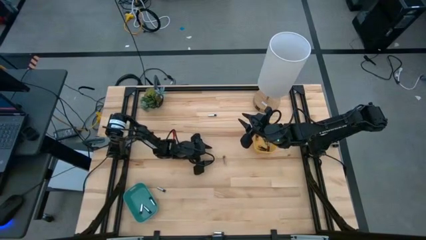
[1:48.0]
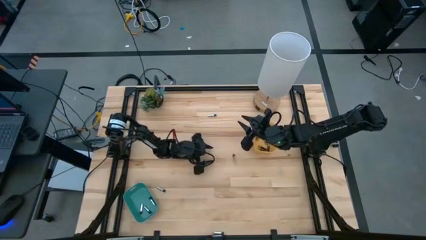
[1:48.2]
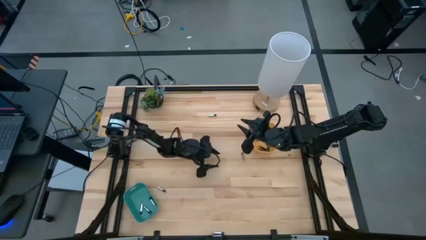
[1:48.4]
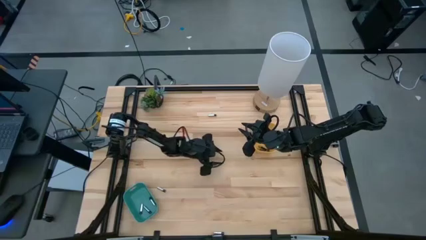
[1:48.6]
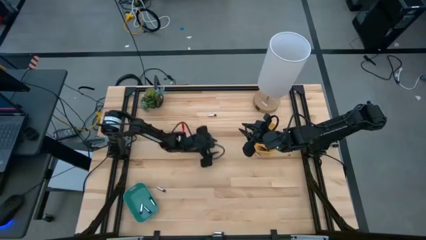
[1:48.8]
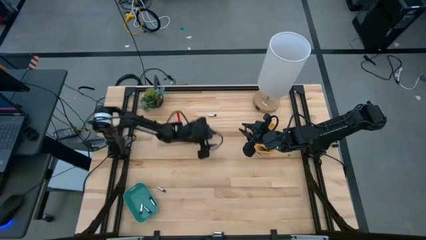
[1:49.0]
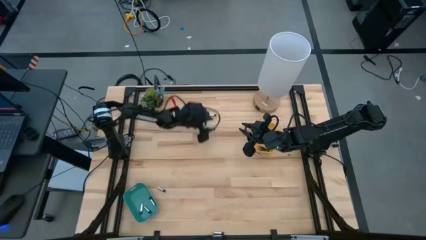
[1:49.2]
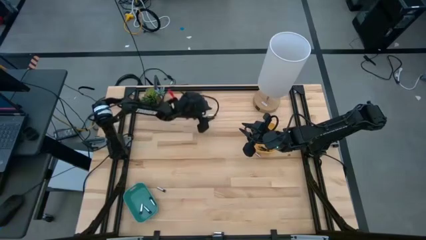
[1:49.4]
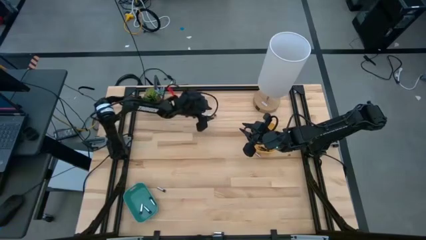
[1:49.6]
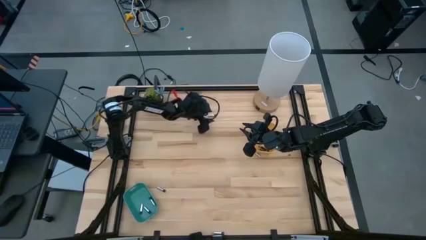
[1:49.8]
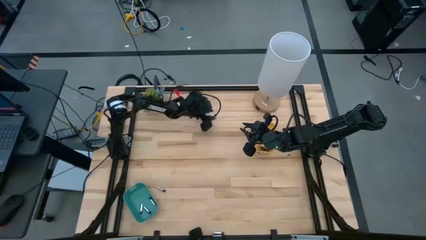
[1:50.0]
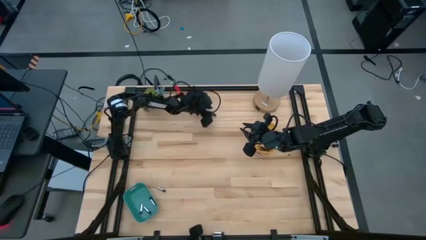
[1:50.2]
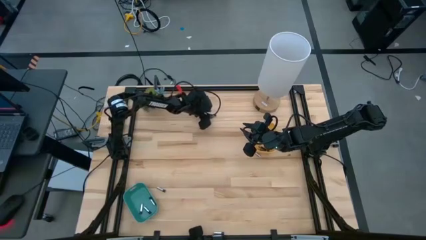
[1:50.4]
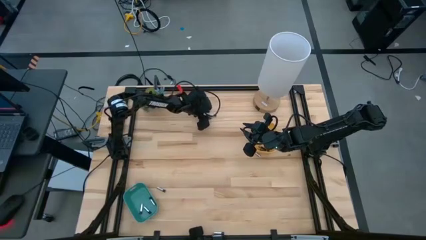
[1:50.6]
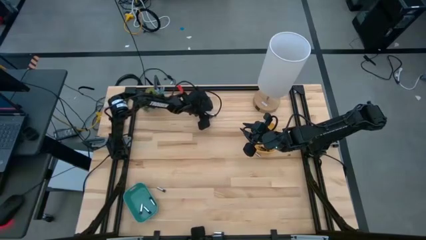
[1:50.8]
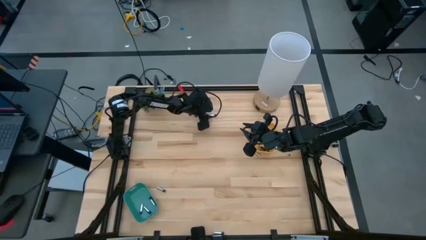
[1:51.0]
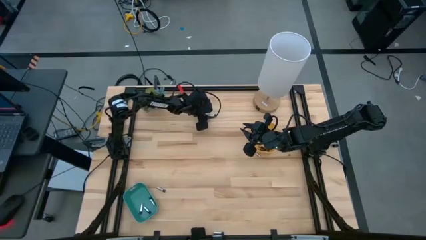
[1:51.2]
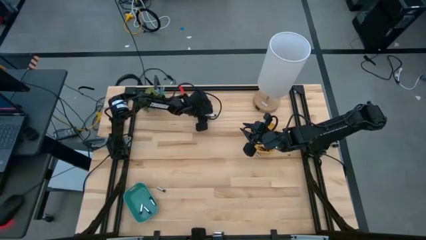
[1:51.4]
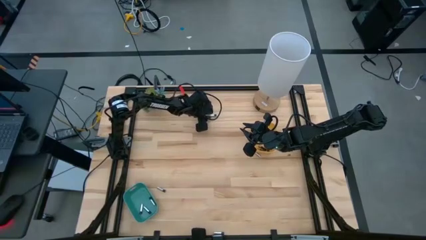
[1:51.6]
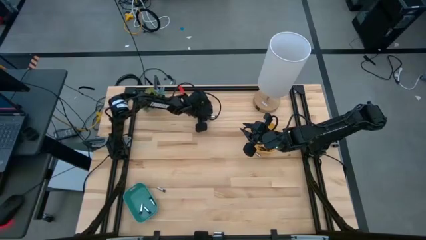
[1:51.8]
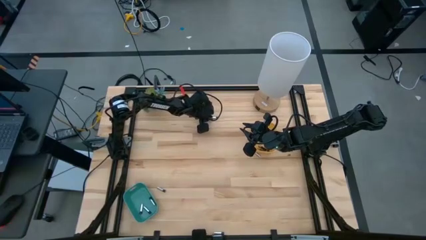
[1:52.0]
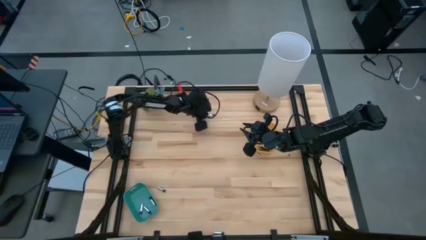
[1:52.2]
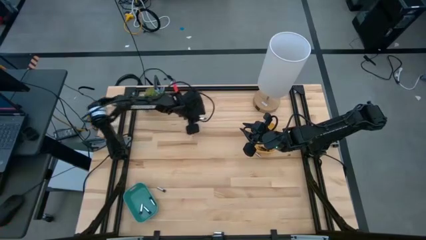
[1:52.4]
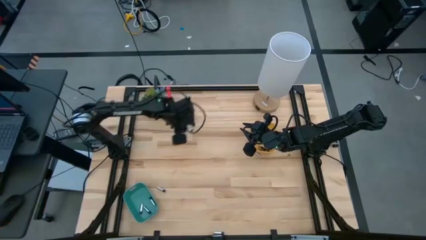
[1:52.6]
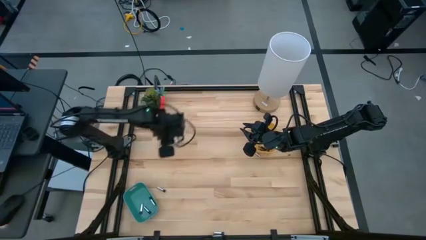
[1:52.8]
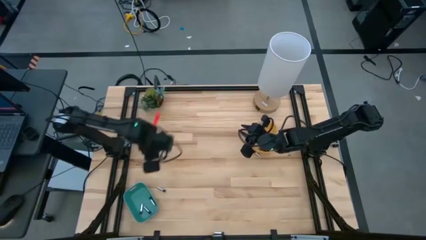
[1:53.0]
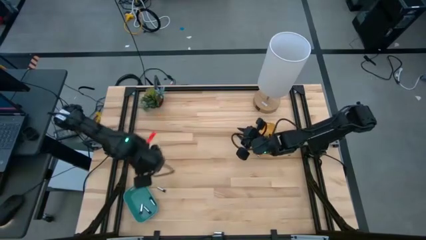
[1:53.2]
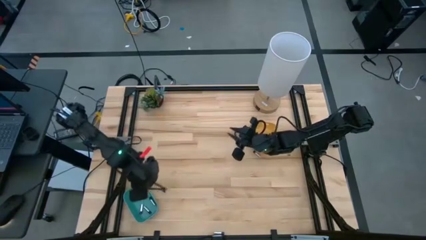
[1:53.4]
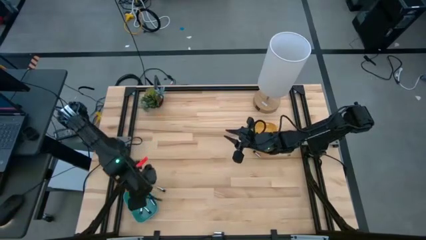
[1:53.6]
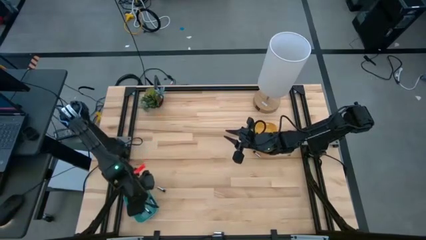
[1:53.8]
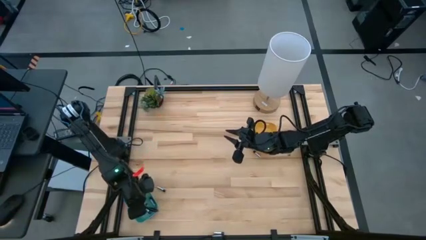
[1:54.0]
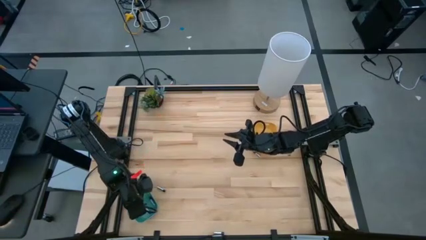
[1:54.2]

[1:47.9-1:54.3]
Task: Sort batteries
Put the silver battery into the blue bin

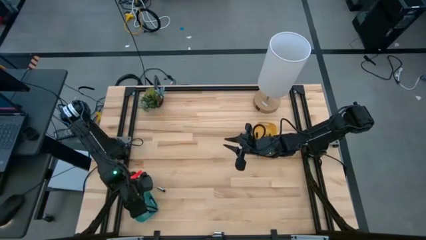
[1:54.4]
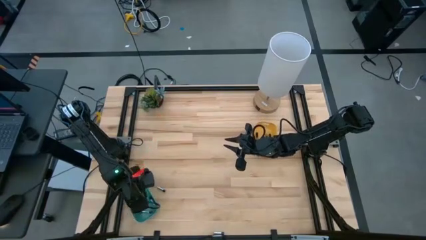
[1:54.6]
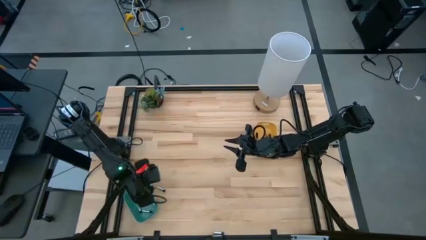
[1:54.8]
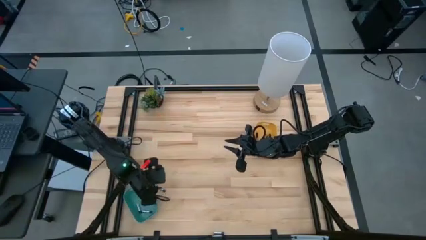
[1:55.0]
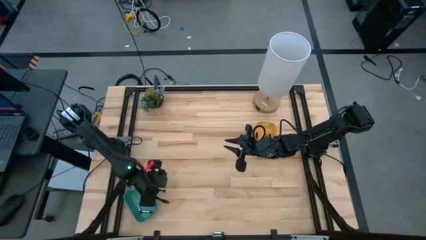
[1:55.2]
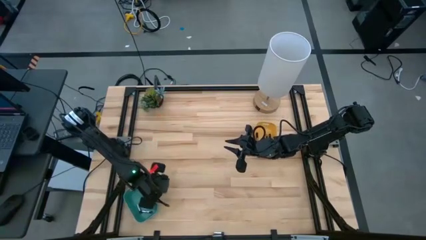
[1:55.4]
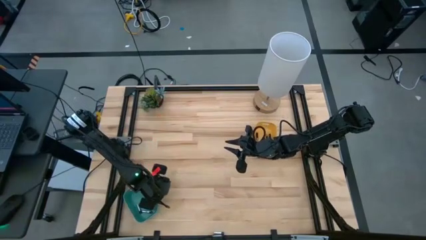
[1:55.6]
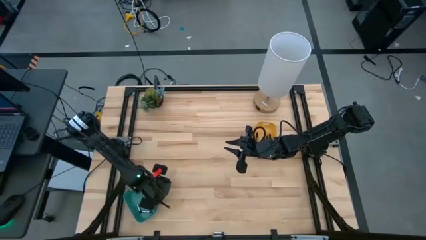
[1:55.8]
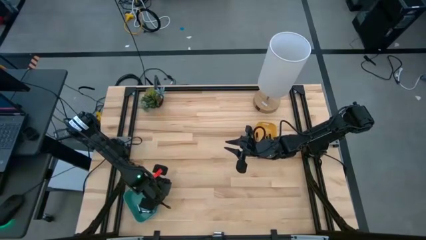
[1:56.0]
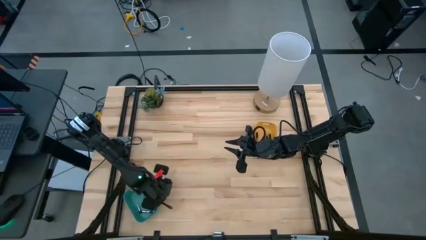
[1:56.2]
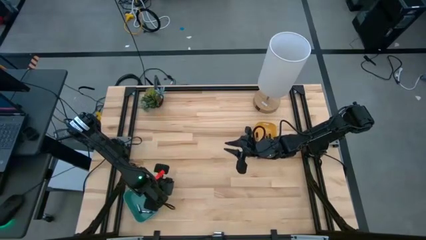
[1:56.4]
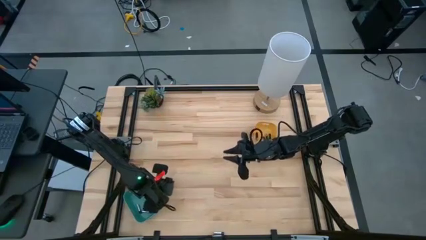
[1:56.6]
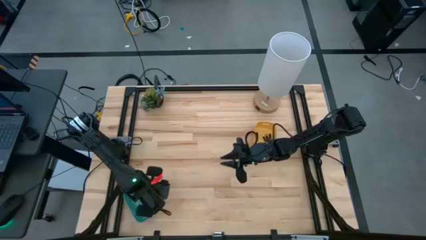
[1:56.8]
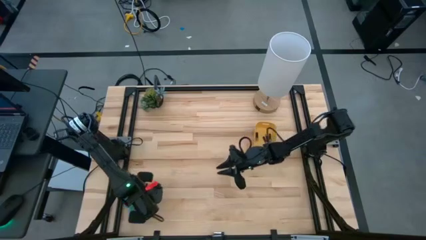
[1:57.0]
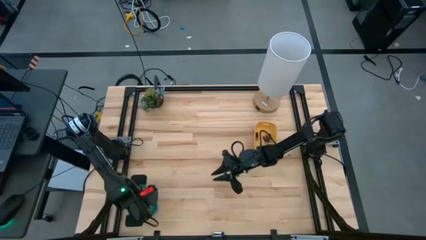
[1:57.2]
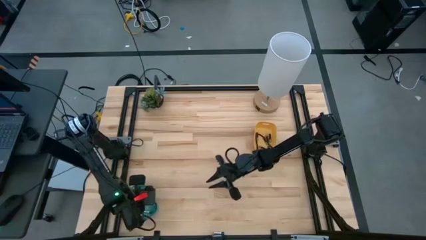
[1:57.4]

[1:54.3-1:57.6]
Put the silver battery into the blue bin

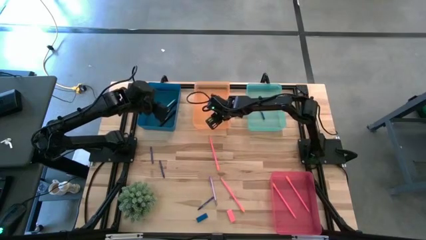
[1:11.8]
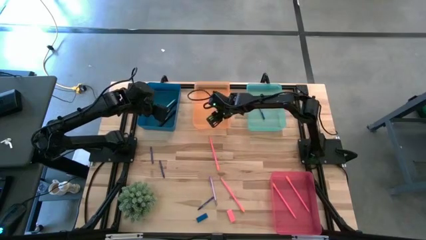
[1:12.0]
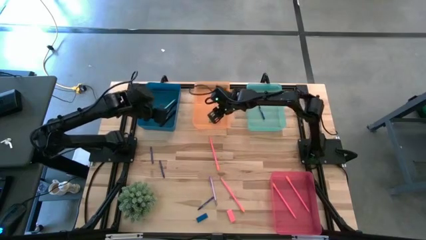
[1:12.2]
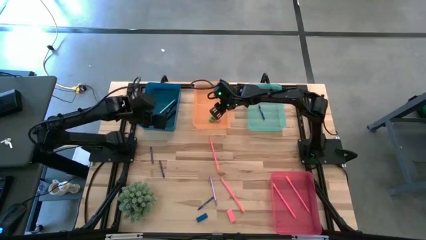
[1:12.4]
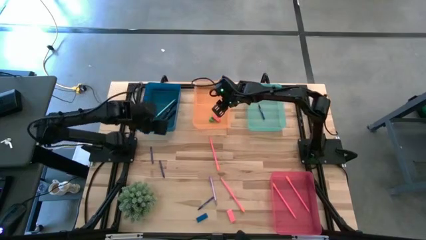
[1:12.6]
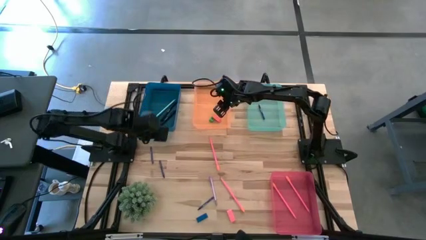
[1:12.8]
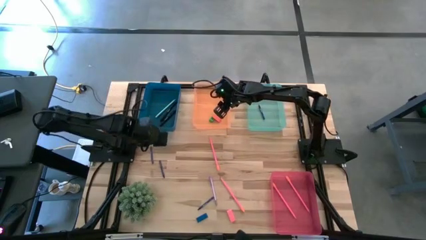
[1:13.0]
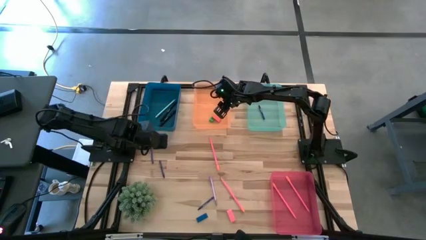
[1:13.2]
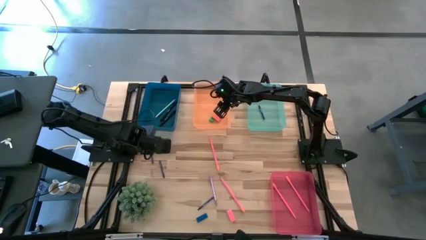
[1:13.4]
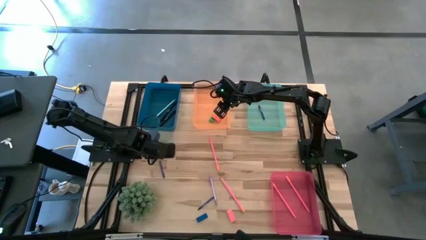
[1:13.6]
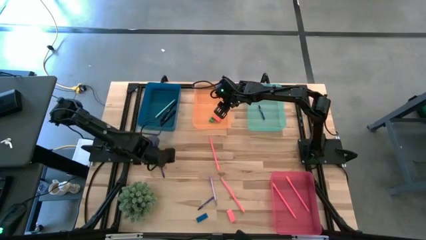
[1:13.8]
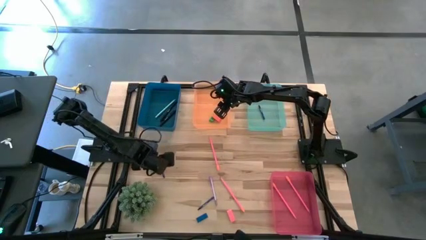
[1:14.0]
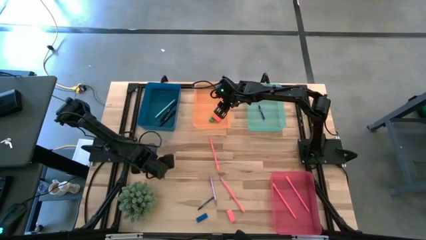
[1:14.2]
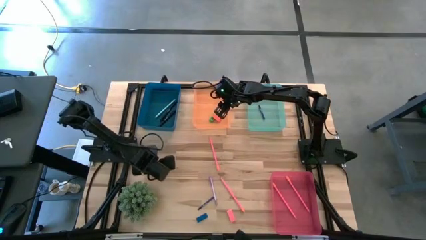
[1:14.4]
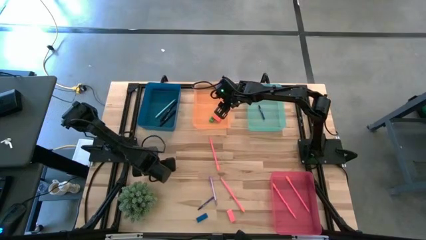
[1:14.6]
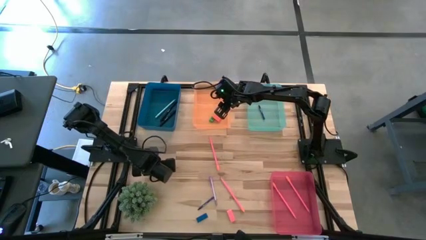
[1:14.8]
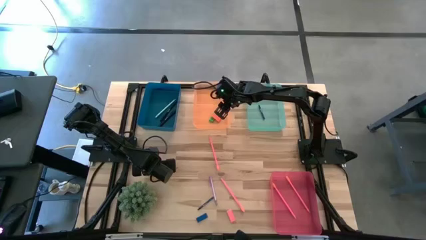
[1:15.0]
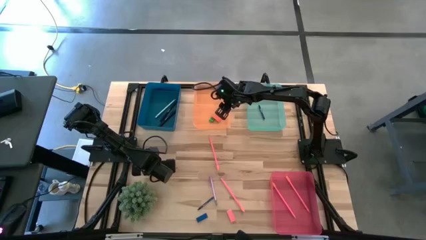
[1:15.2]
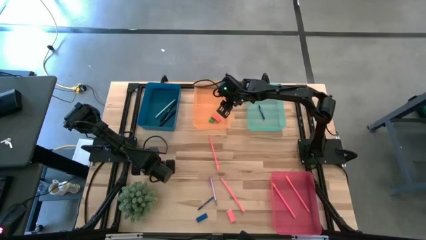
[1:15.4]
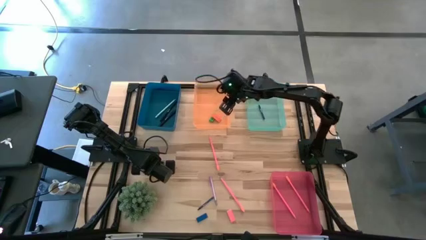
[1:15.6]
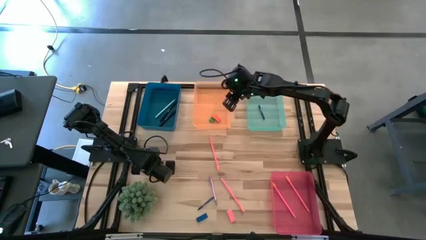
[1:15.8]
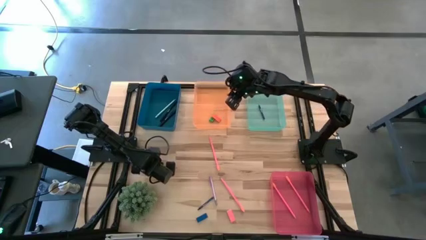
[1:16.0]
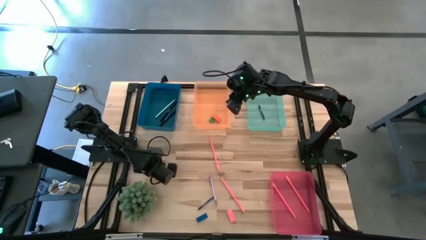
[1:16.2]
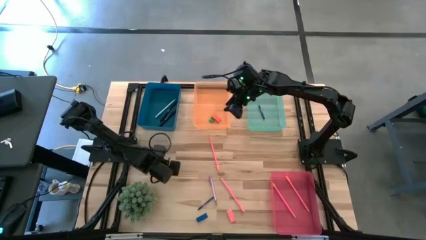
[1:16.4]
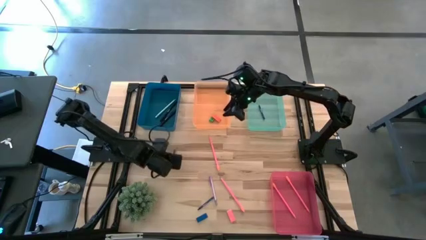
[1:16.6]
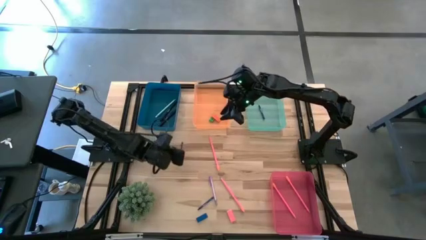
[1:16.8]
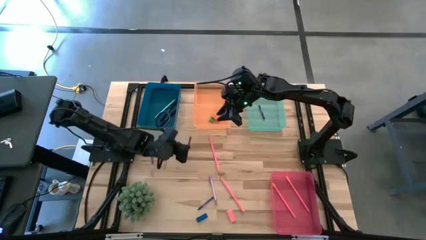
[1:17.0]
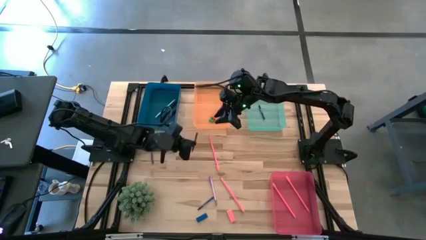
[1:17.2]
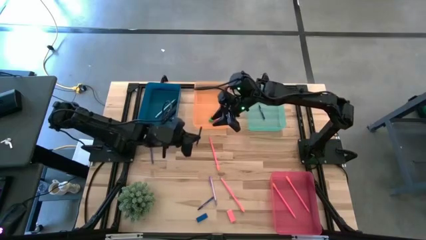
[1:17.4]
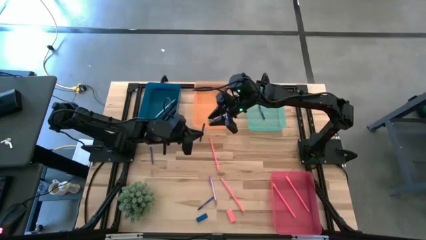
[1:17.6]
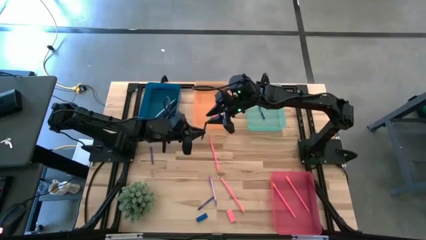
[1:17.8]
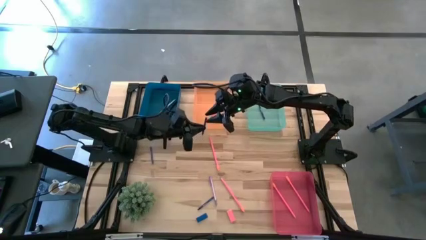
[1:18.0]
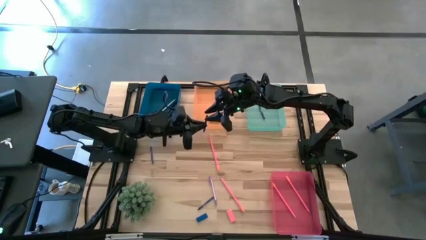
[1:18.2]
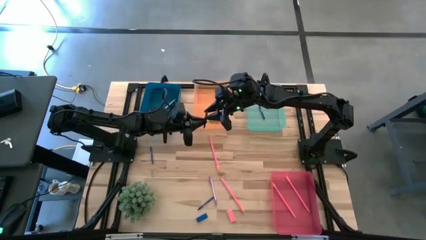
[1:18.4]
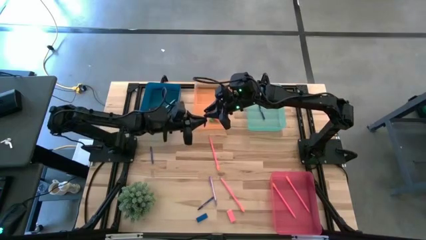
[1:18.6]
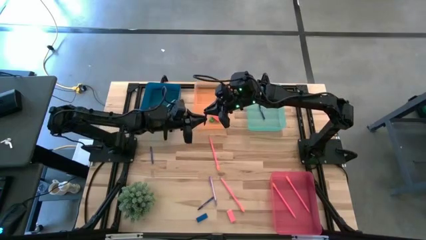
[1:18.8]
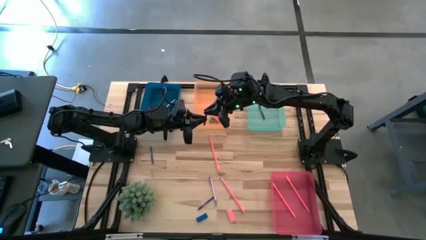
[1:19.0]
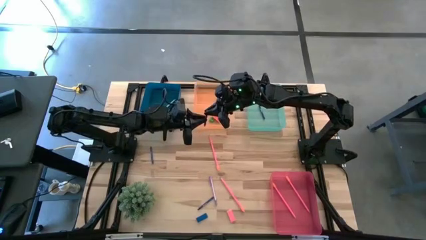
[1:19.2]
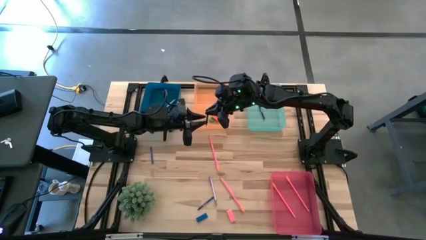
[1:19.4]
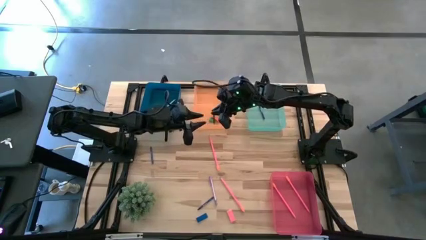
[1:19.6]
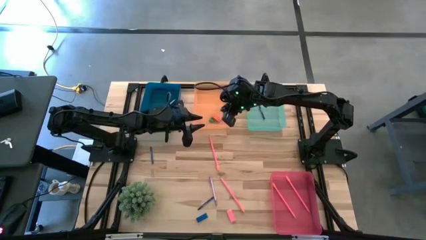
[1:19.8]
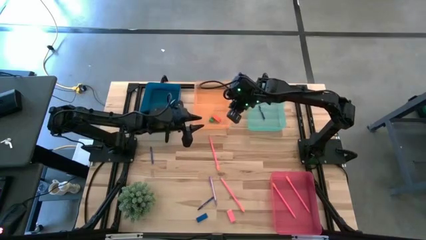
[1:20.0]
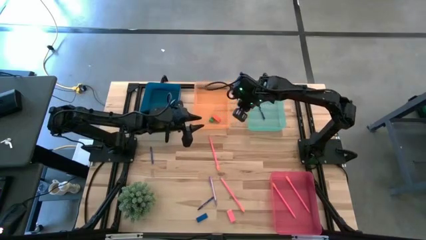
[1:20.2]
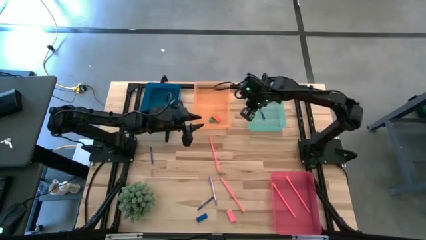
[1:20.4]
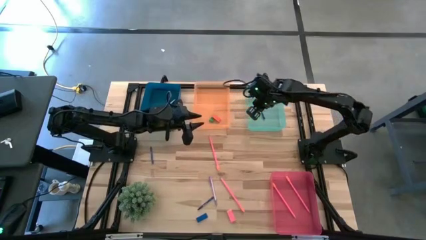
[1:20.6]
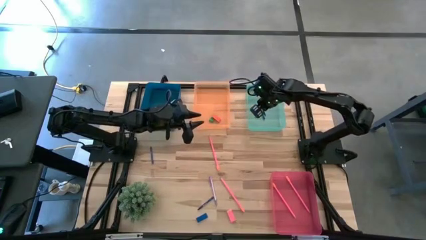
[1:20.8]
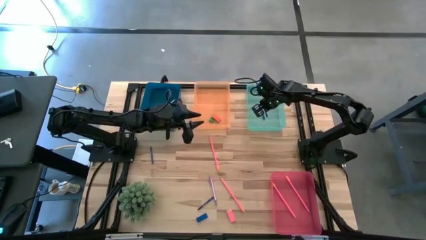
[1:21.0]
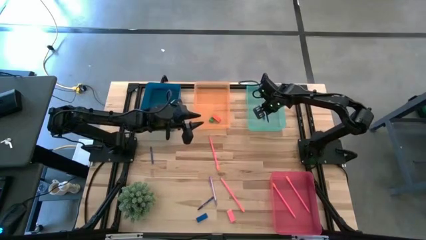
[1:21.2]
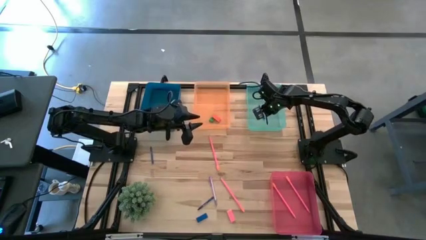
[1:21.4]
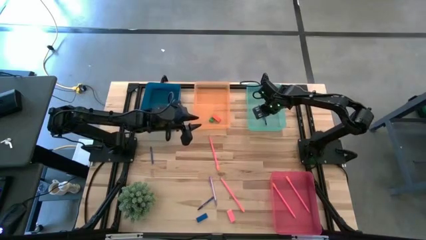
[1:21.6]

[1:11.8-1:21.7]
Task: Sort crayons/erasers/pens/pencils in bins
Put the blue crayon into the green bin
